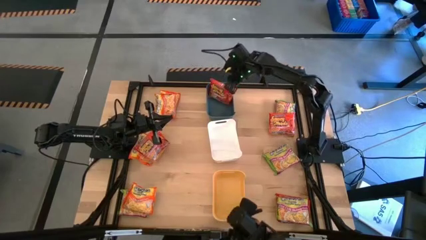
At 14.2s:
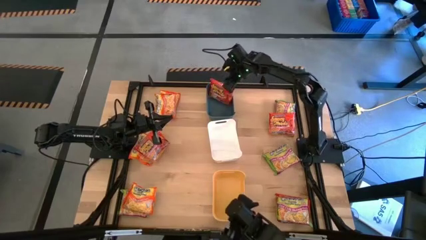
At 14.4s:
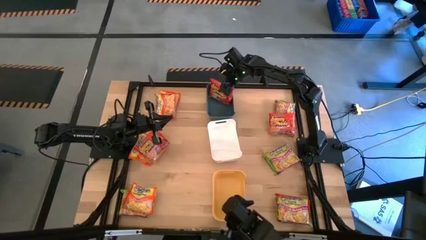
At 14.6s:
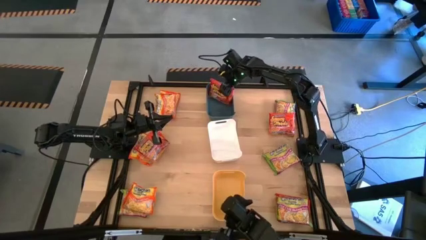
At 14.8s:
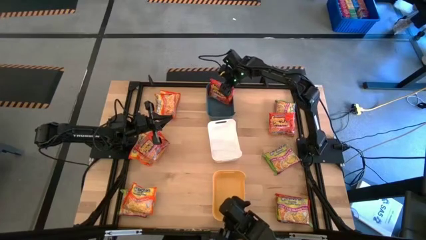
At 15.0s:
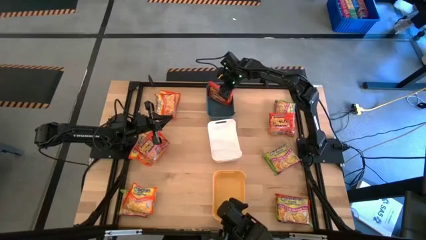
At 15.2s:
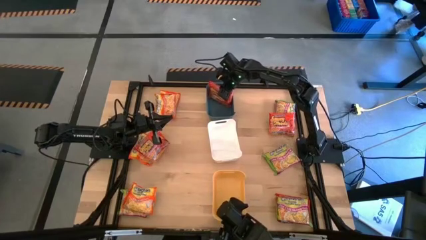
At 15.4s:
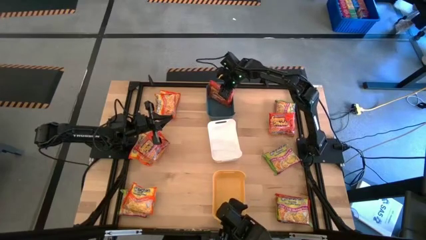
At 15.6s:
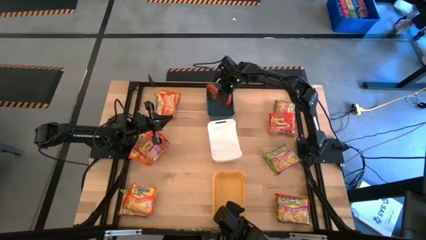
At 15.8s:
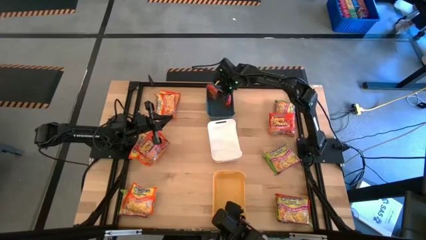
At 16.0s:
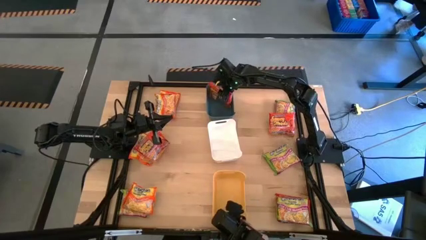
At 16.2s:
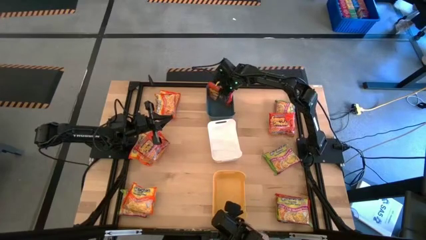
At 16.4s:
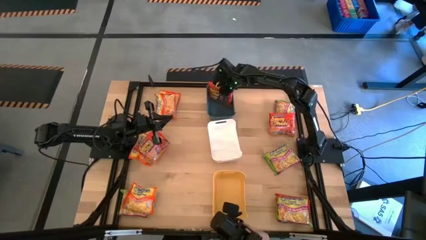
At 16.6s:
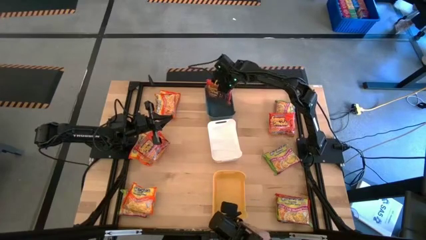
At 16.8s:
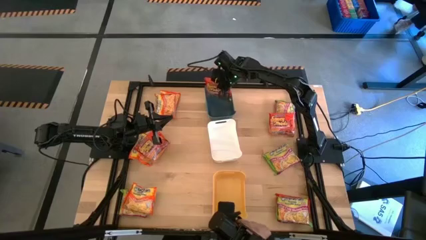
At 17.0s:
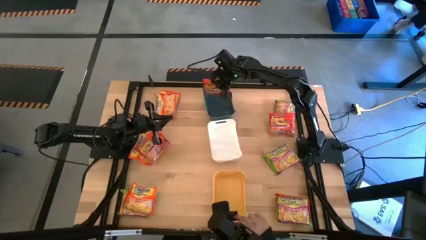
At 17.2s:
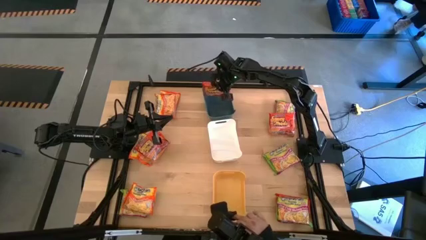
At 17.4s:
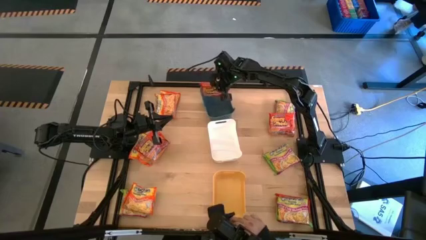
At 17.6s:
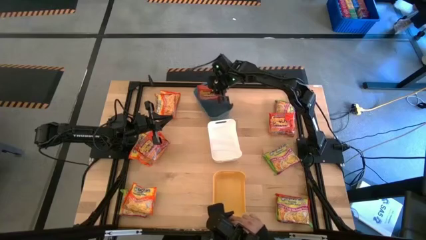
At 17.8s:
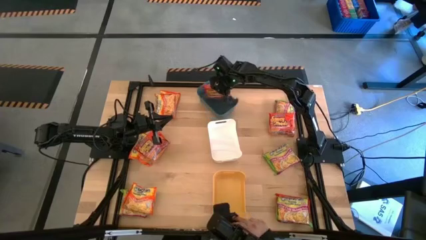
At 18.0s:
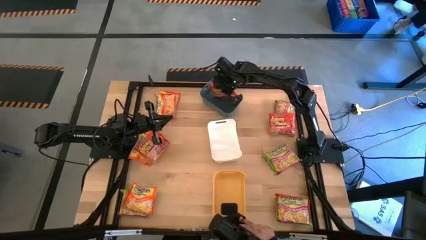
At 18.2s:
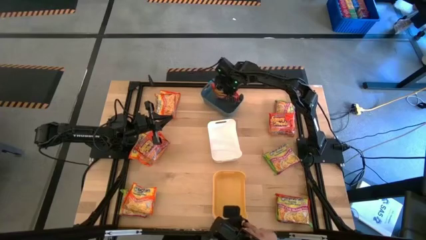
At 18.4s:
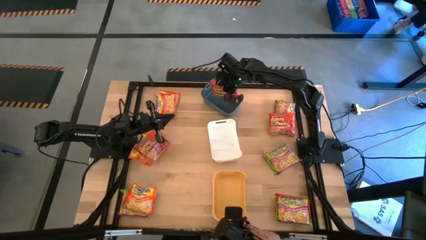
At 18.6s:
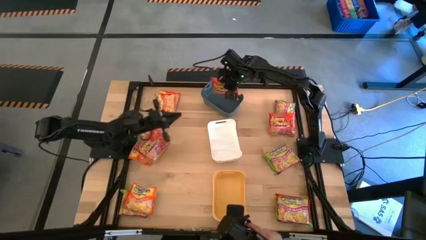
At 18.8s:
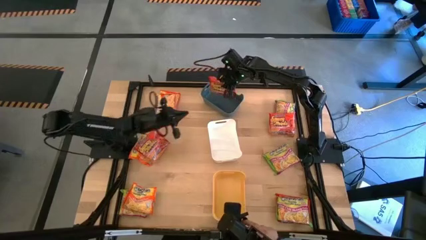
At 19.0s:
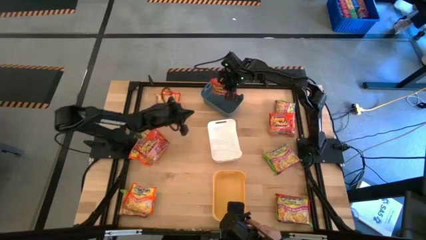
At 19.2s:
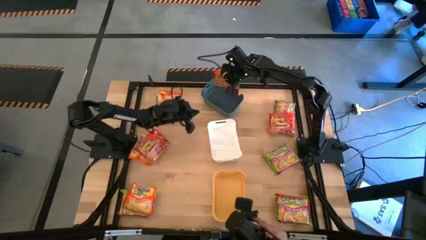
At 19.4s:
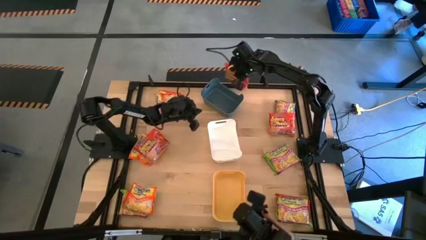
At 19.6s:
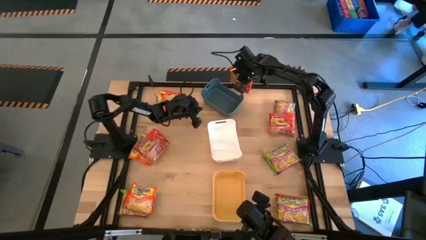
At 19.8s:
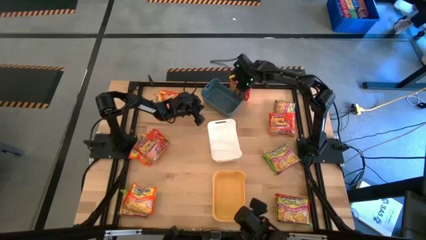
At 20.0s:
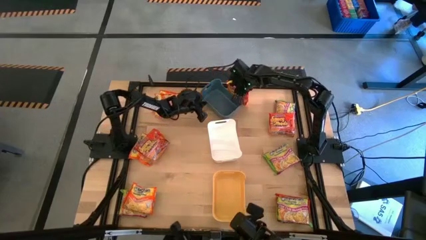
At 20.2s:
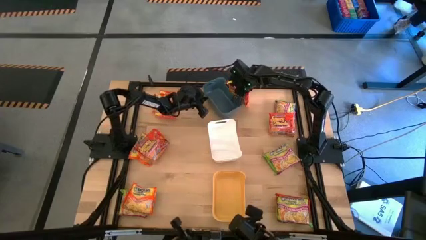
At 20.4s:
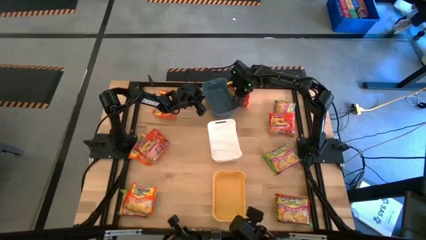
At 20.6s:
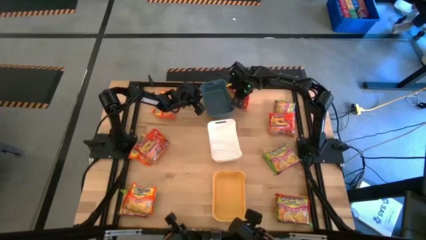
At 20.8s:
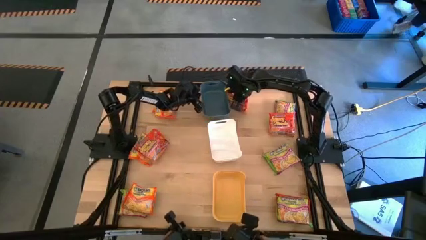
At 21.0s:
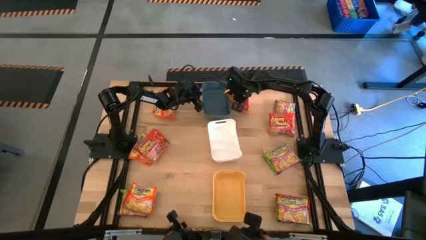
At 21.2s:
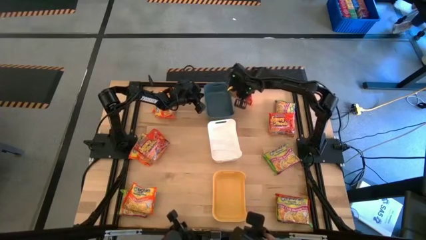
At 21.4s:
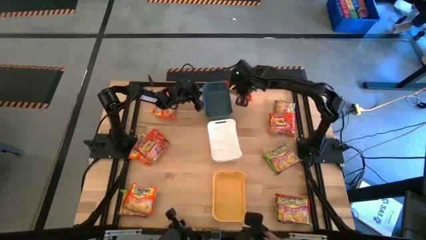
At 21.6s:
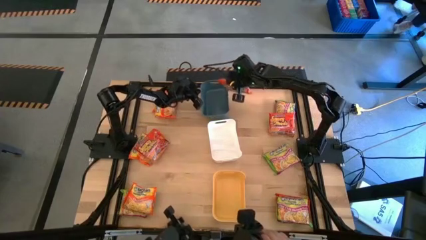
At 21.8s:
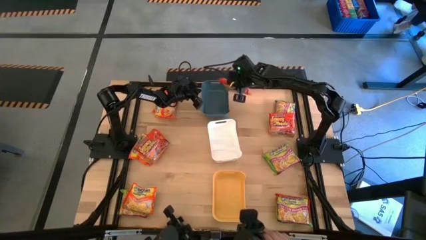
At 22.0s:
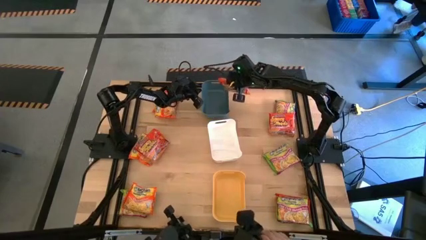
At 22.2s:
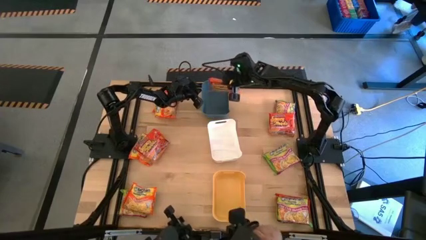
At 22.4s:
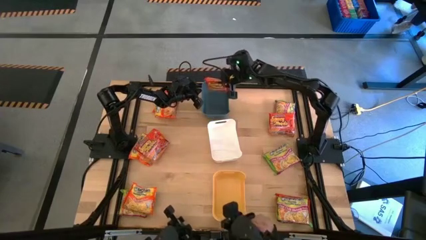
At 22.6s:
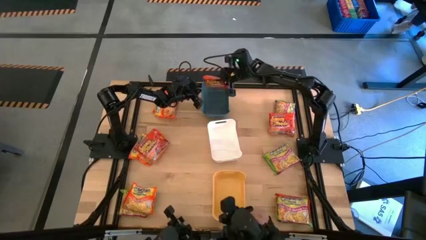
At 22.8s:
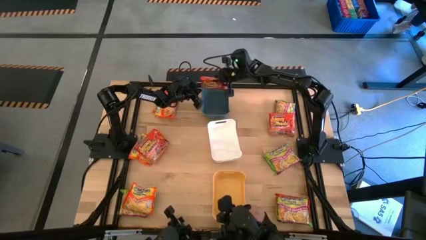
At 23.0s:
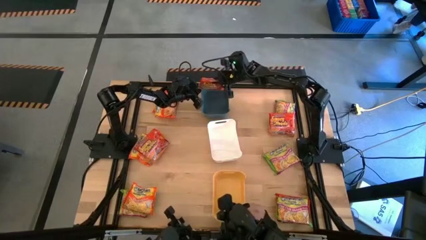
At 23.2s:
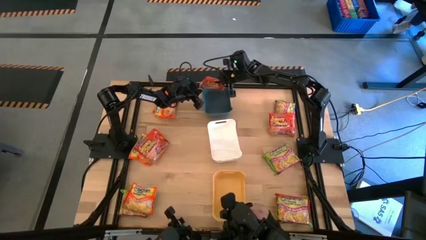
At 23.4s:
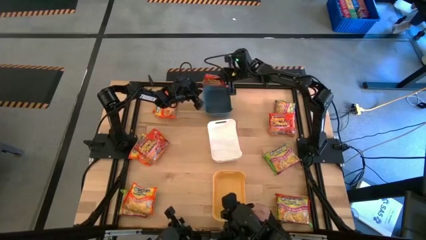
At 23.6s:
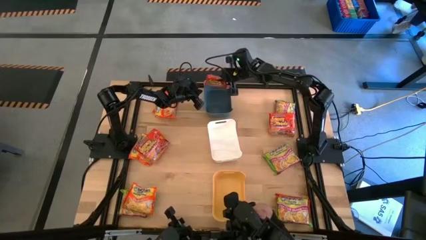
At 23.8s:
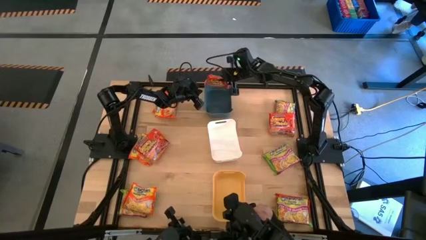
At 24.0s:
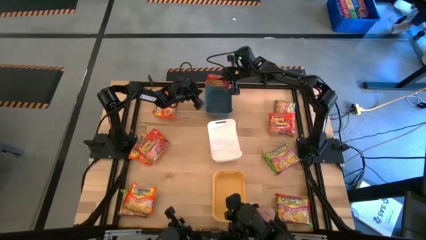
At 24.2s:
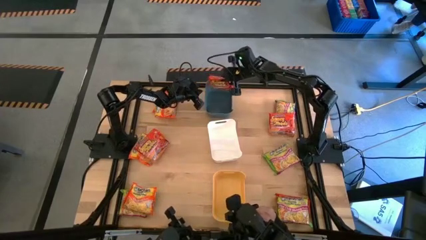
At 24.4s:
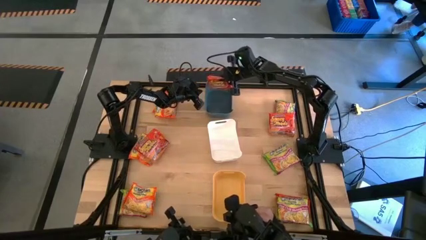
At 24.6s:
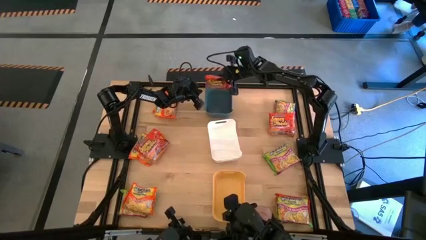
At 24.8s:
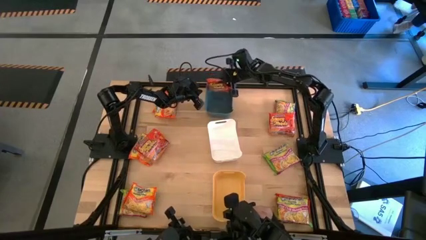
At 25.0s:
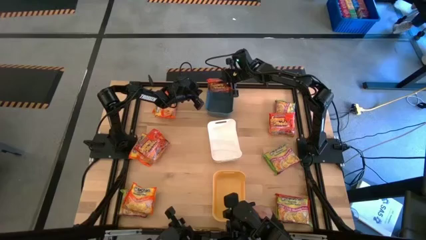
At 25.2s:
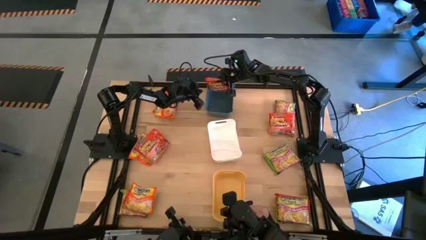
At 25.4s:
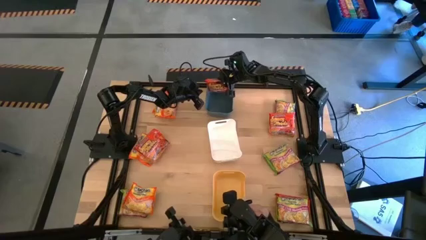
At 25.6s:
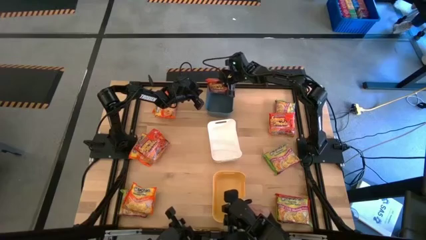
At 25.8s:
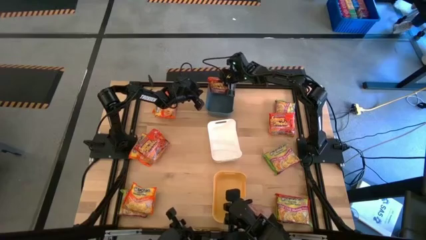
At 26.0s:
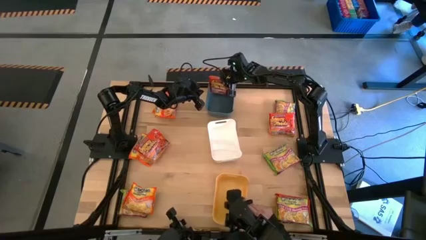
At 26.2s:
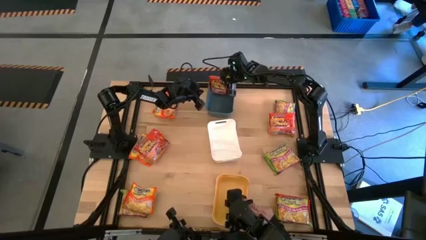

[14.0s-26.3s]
Task: Sort Maruchan noodles
Put the red noodle pack into the blue bin

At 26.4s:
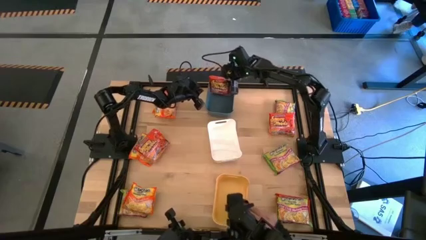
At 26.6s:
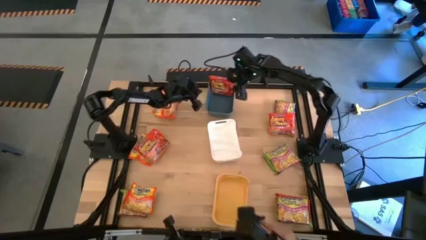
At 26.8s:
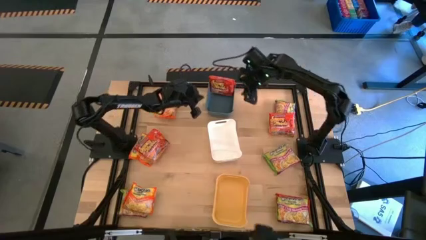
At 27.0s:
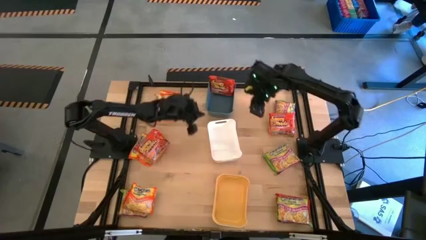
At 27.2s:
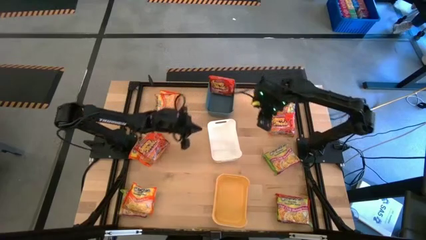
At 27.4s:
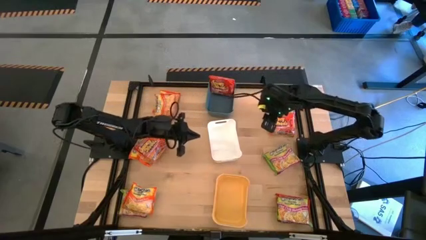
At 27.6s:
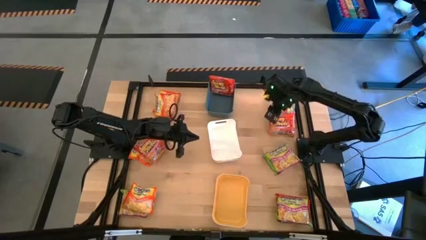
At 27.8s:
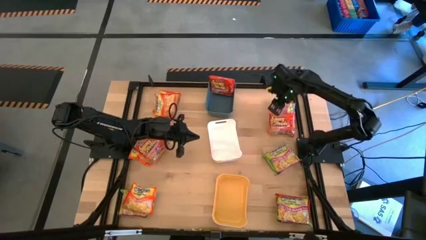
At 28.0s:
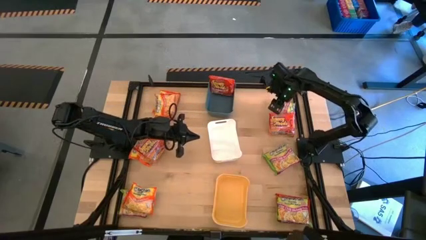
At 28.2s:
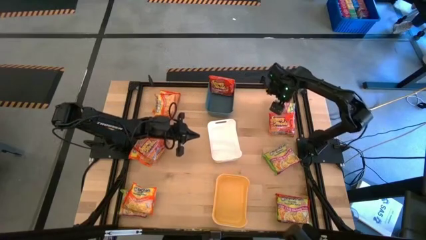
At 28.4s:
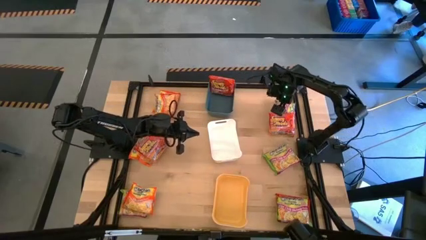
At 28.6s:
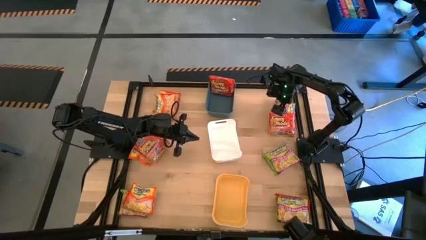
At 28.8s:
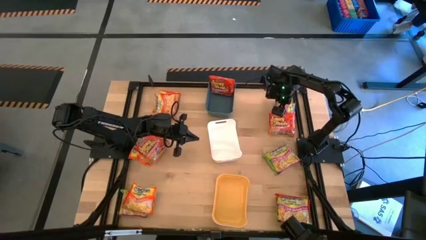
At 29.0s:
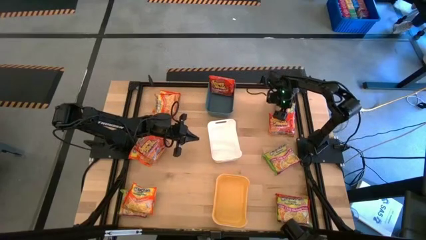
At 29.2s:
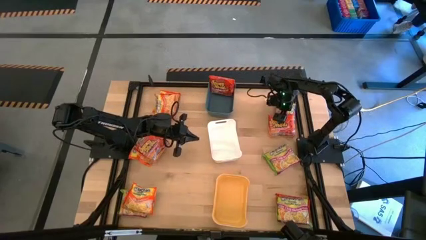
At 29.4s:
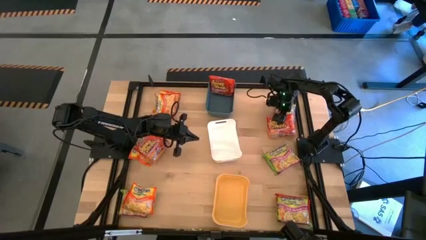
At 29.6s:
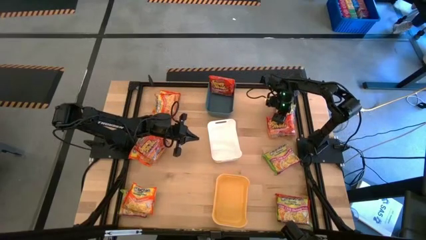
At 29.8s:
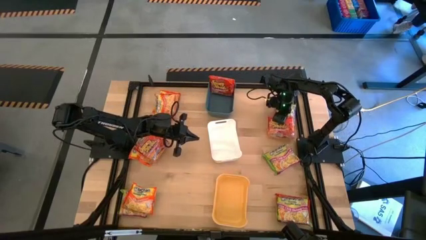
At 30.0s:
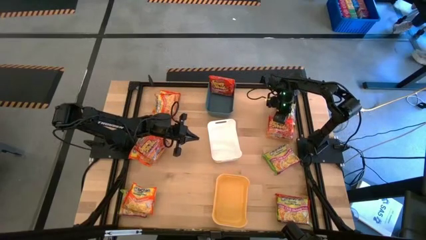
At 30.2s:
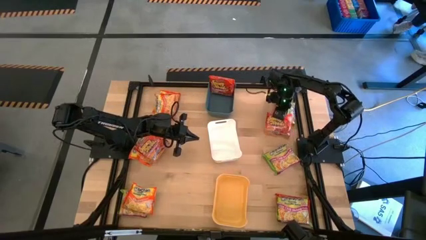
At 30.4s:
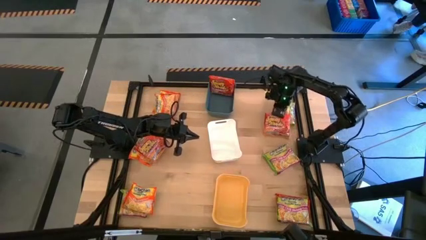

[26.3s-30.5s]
Put the red noodle pack into the blue bin
